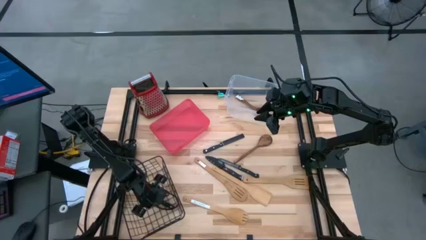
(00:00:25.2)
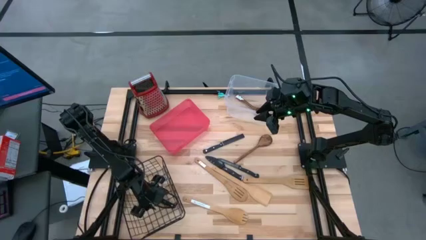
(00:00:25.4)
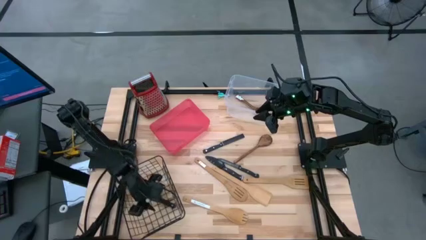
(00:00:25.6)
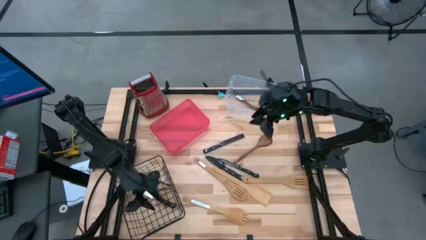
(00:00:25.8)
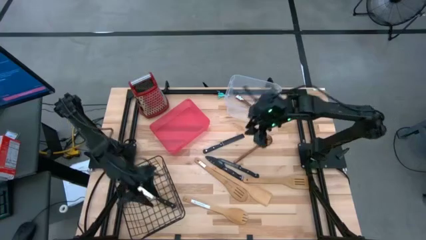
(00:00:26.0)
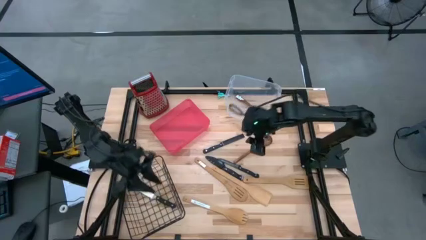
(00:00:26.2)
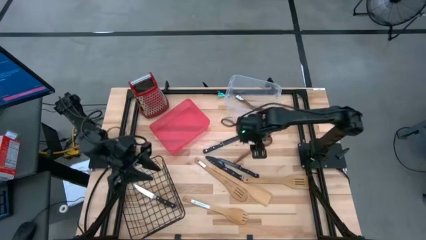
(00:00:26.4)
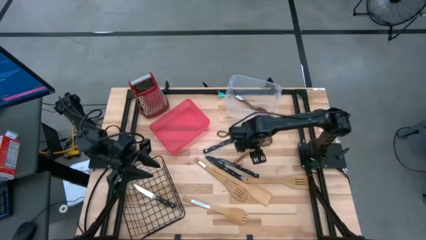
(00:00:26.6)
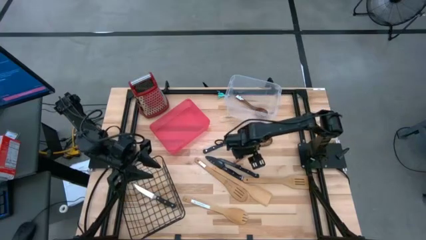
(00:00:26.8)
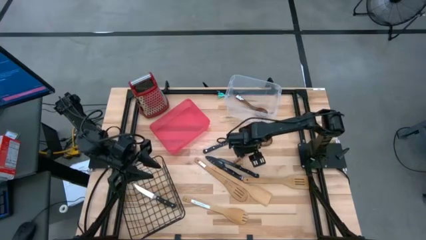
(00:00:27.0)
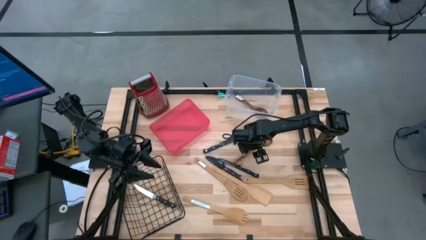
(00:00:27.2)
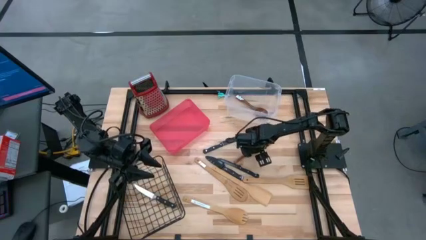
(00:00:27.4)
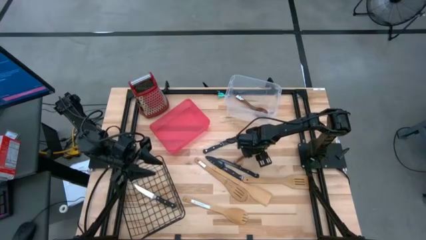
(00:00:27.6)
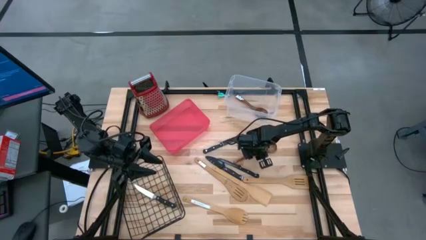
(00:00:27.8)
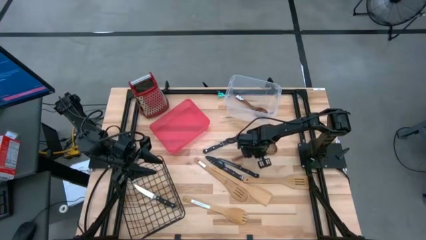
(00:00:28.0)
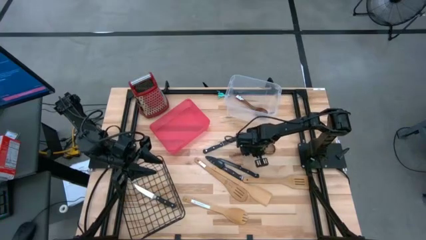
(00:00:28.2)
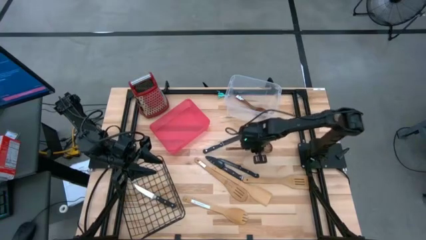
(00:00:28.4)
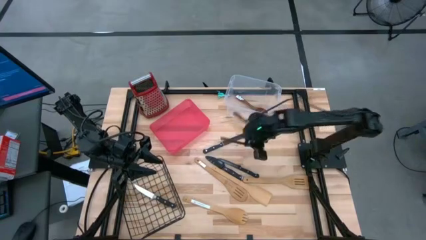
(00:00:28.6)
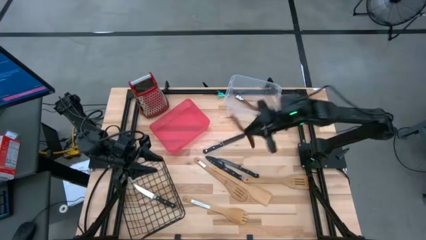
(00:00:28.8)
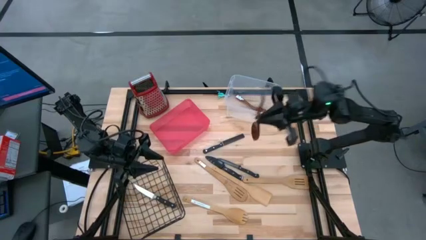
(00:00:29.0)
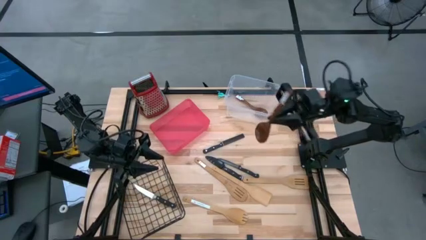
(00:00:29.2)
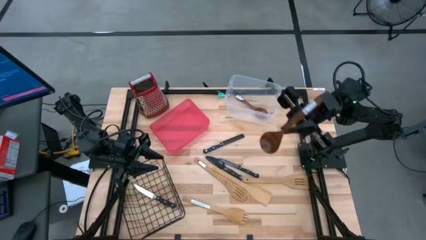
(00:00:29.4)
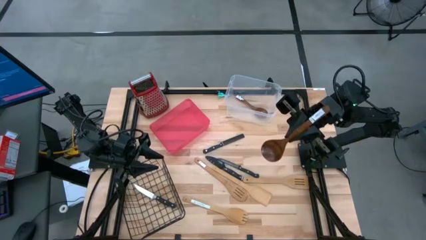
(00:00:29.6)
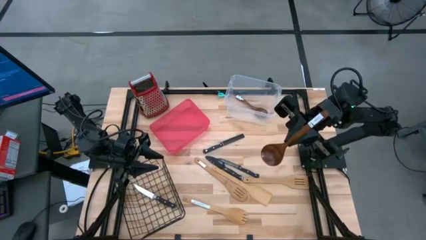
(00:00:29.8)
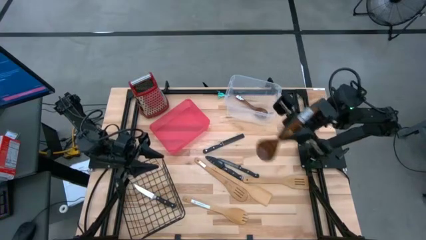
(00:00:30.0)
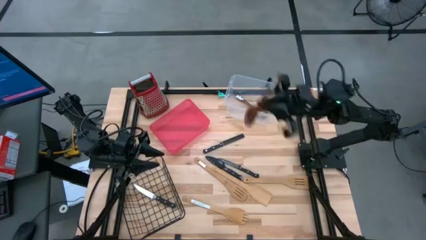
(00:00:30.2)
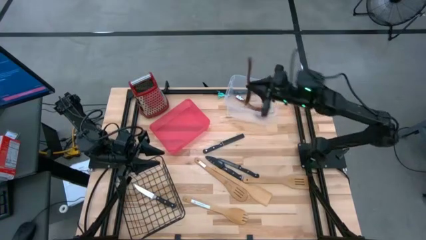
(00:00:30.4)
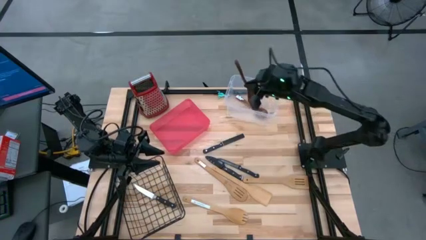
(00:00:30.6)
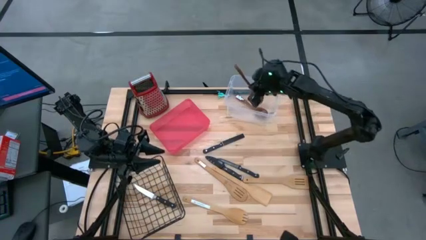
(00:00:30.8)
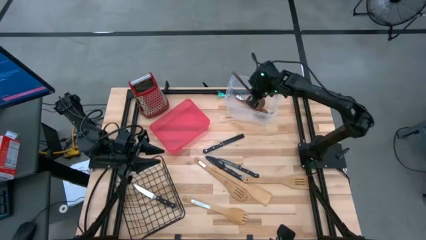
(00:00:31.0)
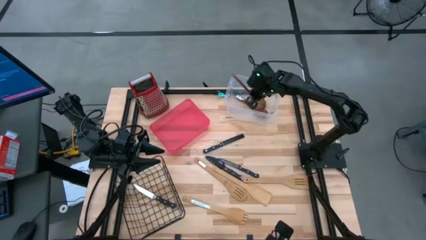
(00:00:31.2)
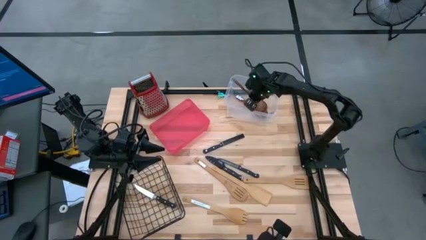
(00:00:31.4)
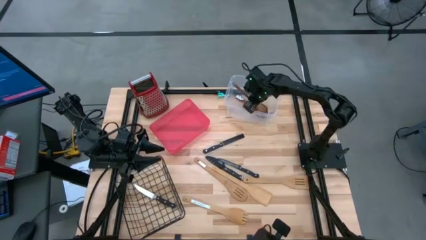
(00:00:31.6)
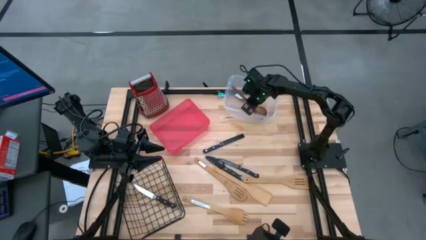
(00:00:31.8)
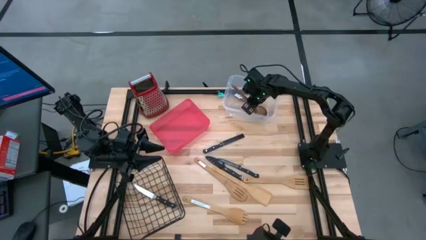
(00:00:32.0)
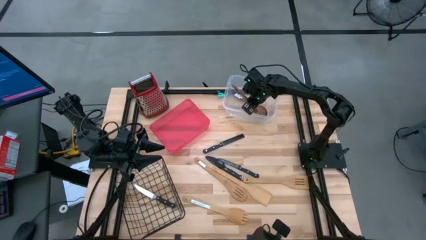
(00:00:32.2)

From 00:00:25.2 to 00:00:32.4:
Task: Pick & Place Kitchen Items
Put the wooden serving spoon into the transparent bin

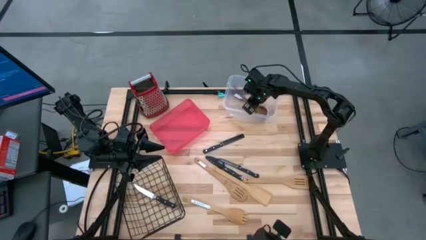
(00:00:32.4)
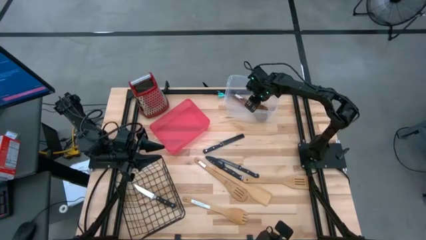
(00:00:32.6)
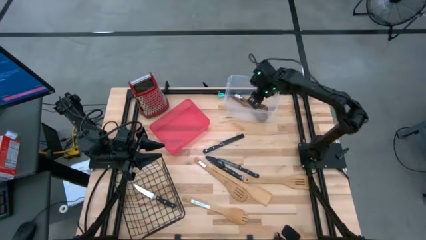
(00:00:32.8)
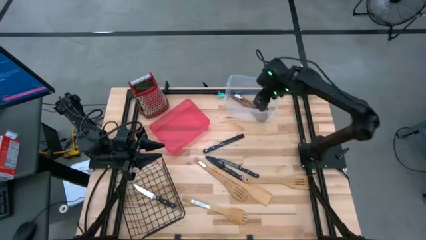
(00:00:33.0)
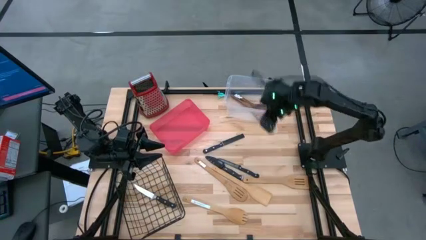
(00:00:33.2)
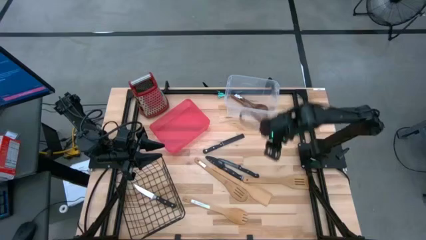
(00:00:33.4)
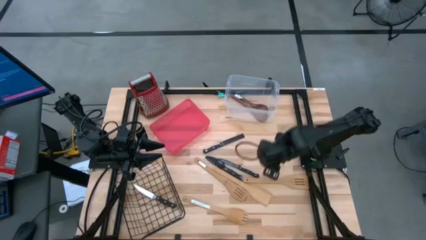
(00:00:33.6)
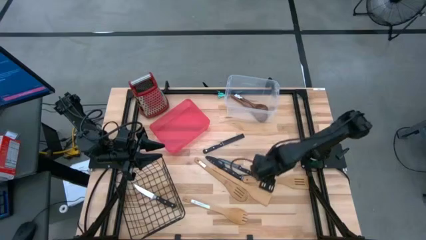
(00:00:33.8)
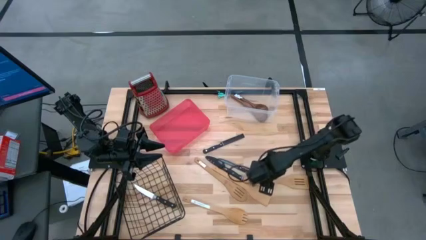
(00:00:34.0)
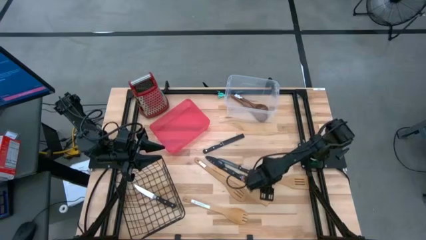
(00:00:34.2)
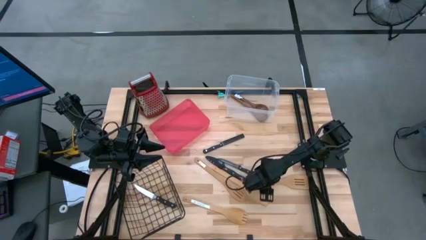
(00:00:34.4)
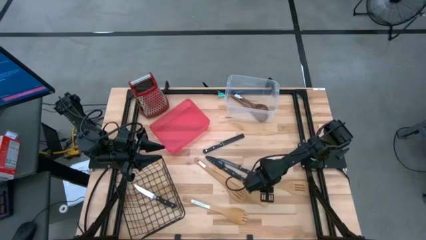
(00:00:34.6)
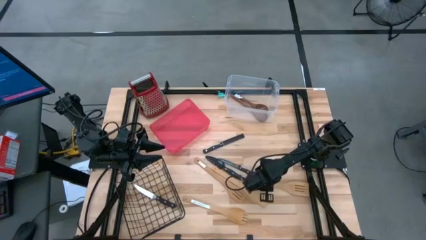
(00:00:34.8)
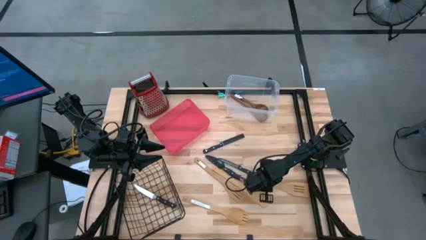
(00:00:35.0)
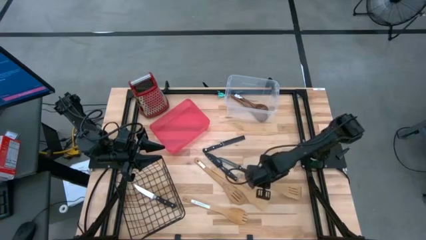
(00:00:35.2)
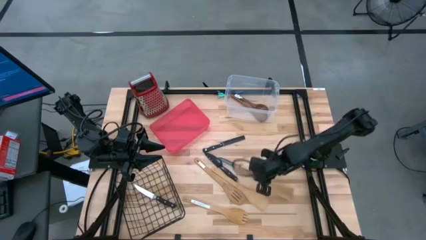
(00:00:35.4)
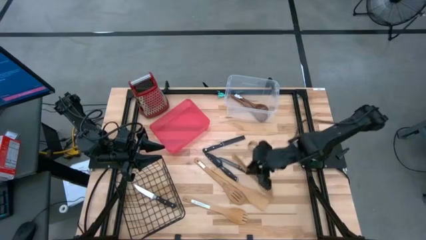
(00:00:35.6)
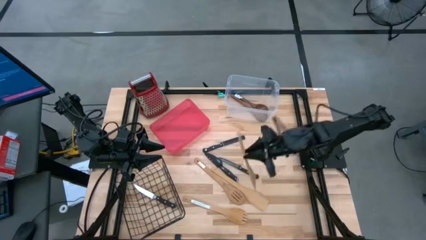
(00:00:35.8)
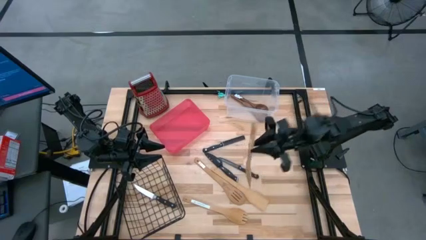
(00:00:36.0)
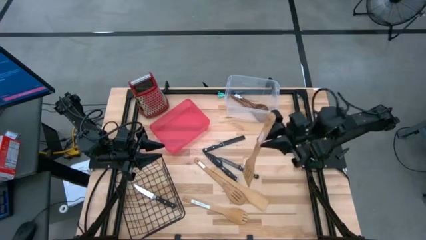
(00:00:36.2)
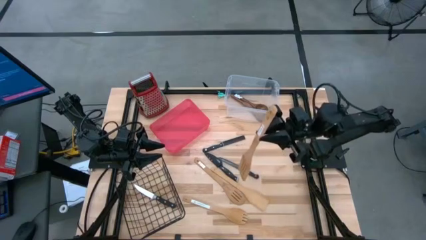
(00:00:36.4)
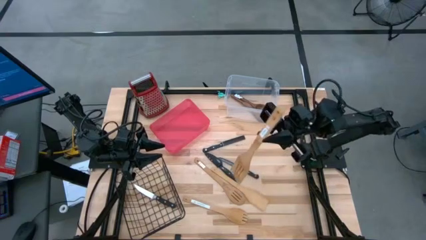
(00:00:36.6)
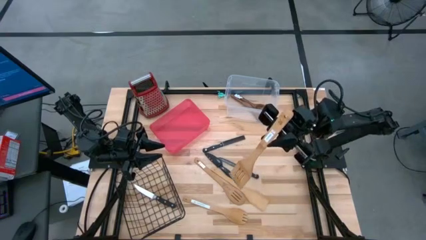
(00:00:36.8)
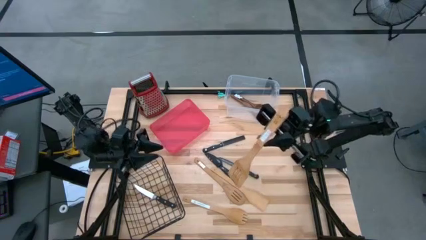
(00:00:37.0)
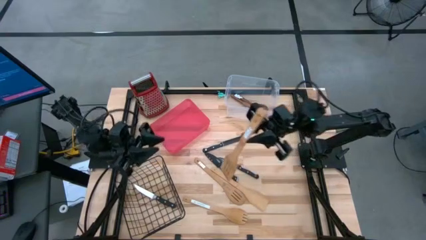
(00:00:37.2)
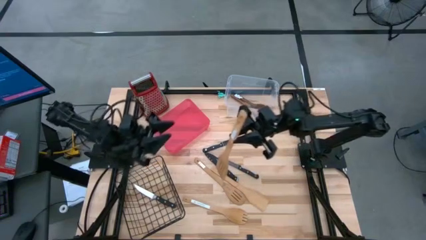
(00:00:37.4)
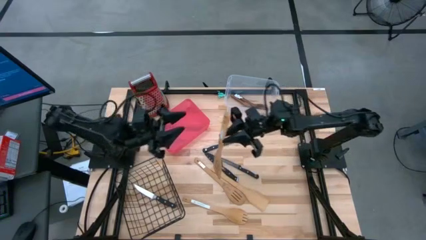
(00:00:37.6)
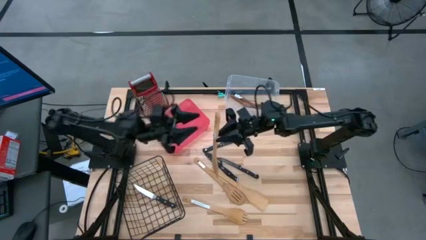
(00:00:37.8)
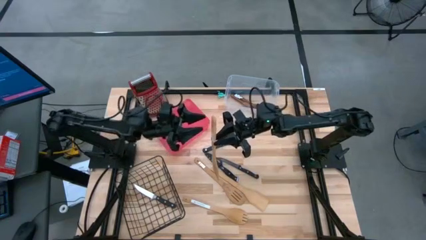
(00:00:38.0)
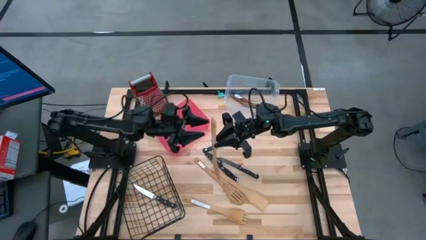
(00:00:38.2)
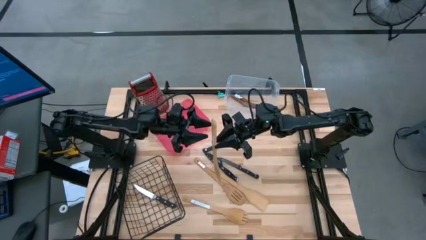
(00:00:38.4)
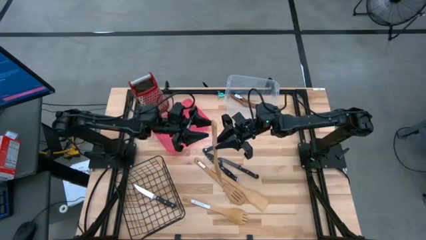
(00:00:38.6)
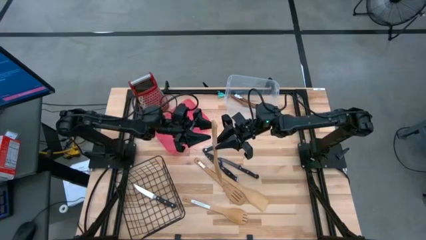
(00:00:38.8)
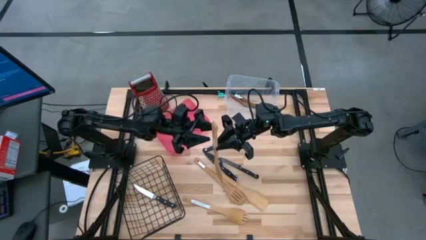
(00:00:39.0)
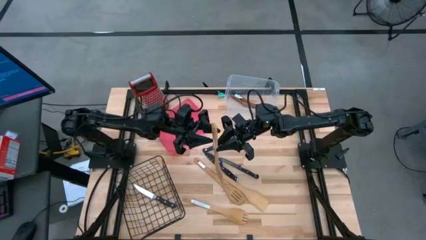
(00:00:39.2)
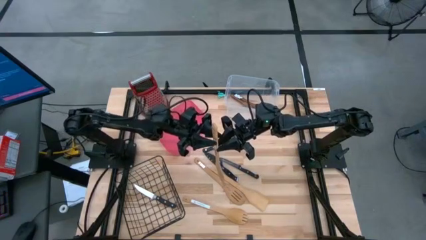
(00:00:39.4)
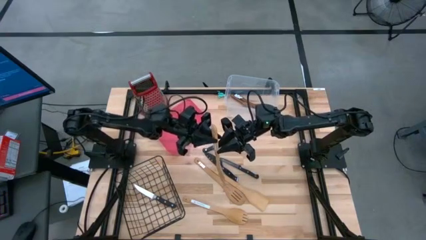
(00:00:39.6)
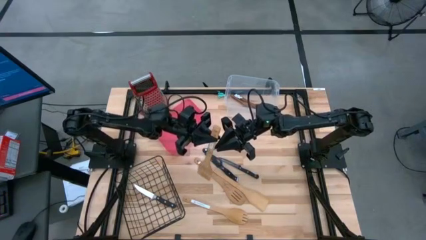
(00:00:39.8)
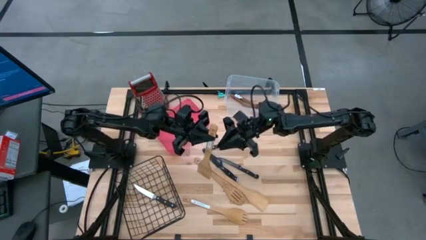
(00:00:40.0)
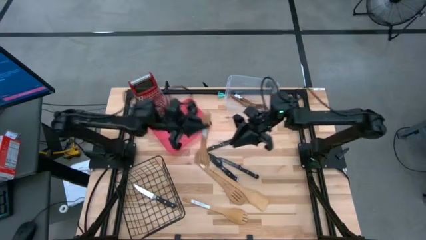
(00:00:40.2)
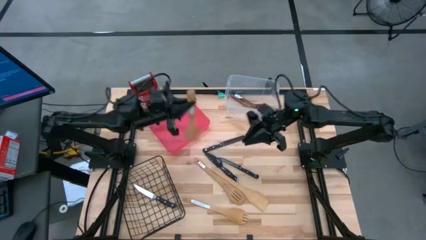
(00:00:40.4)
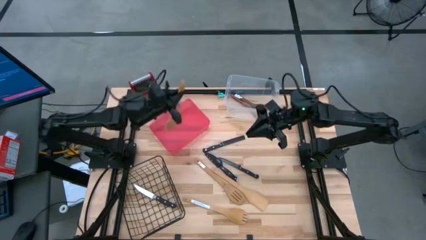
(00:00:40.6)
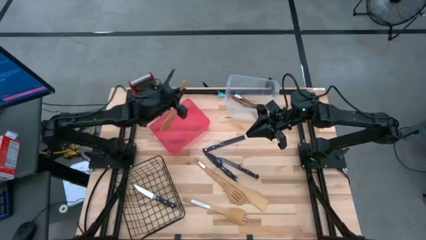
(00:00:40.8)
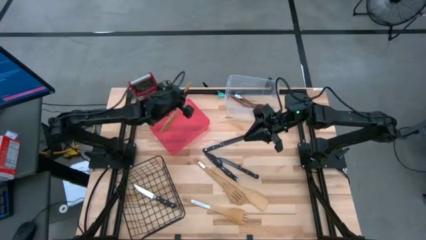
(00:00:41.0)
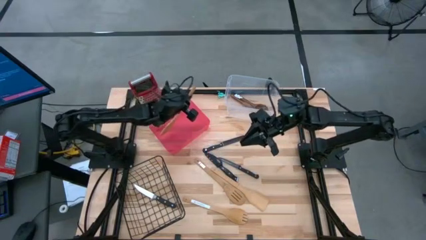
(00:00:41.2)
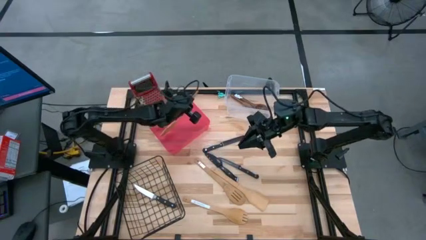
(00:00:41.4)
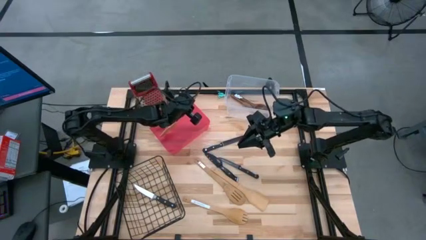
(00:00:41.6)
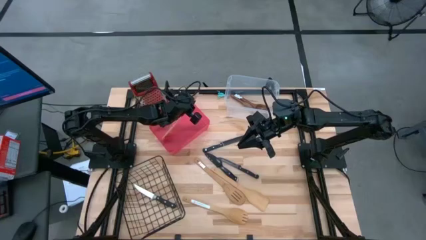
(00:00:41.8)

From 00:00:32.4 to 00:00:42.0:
Put the wooden slotted spatula into the red bin
